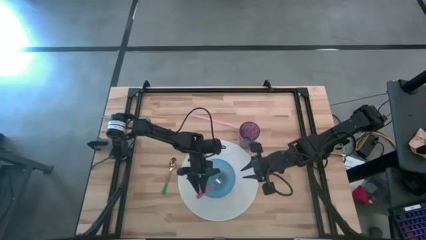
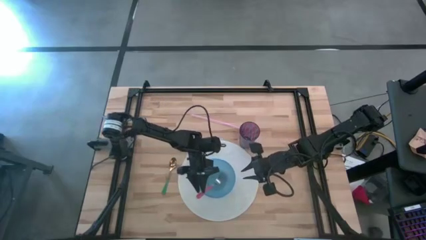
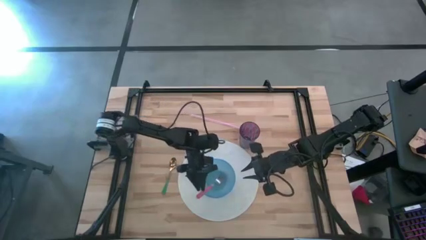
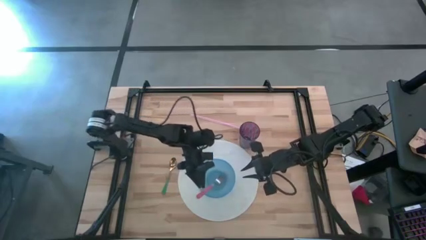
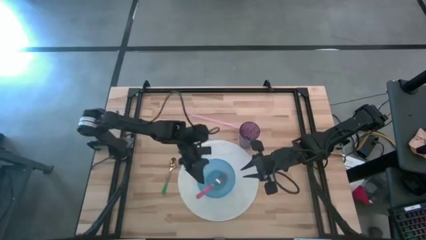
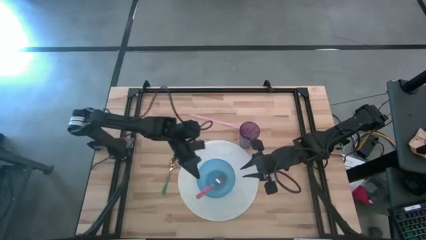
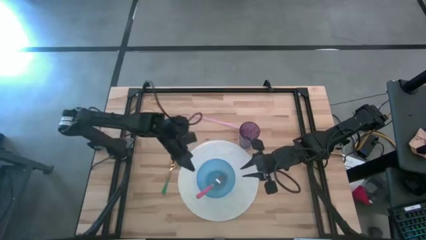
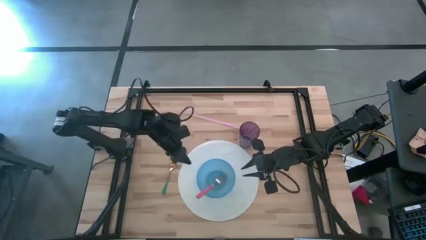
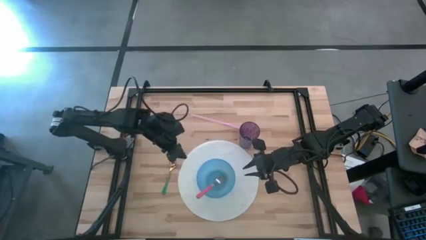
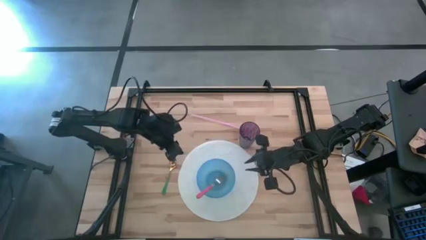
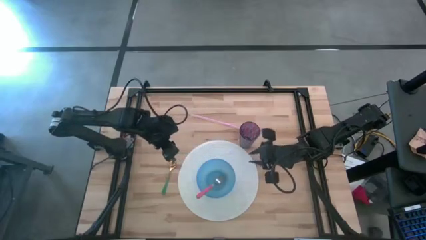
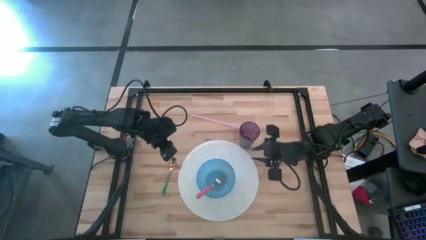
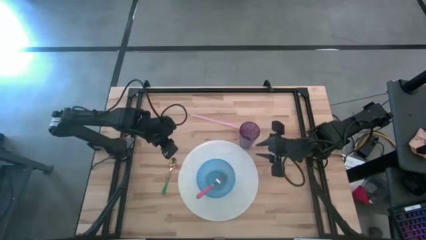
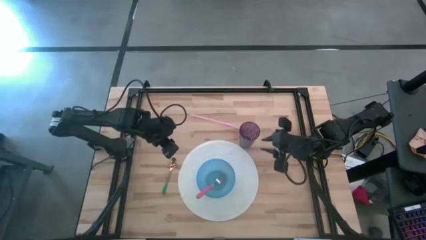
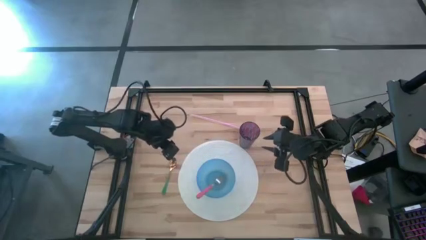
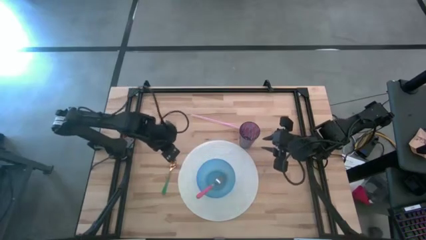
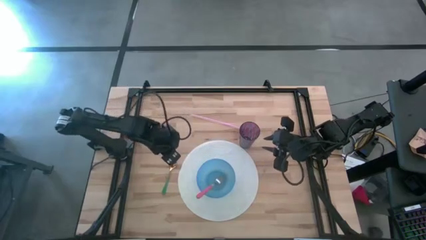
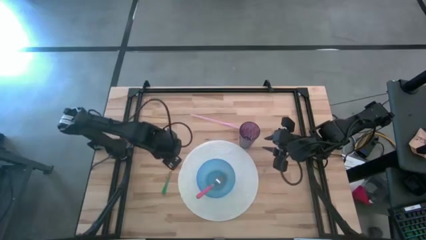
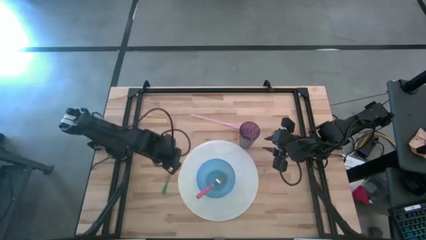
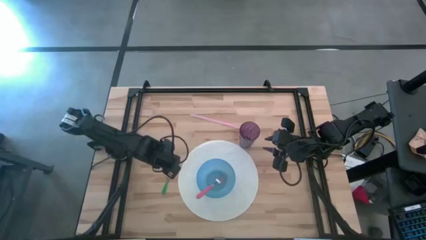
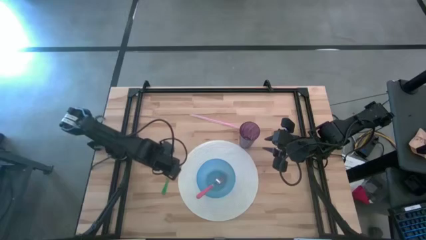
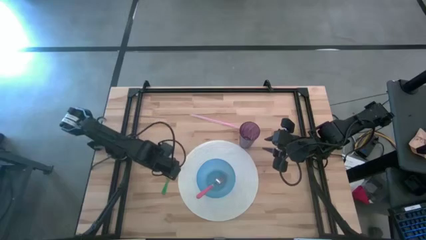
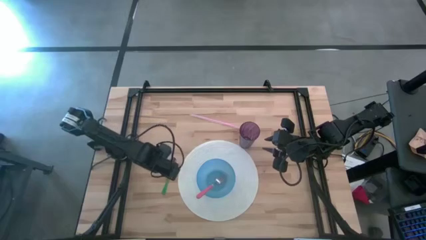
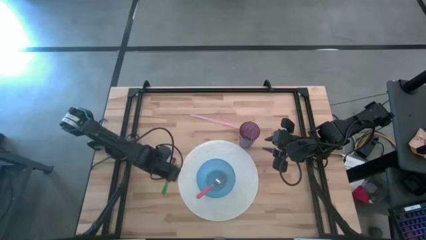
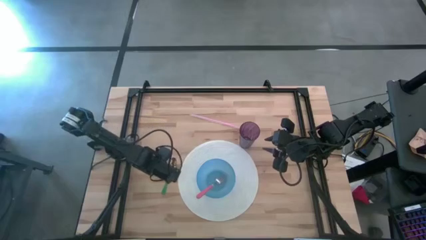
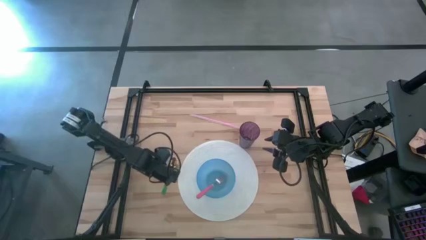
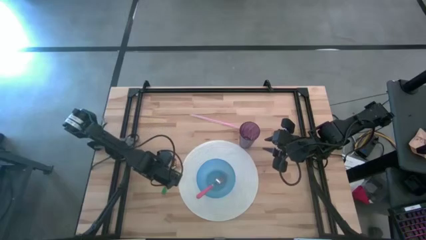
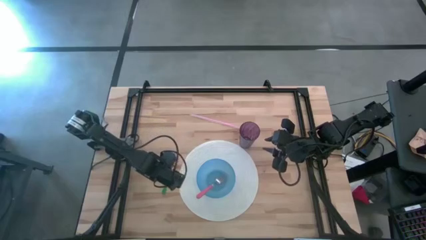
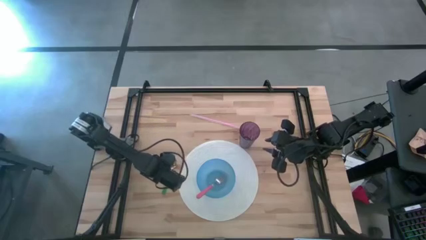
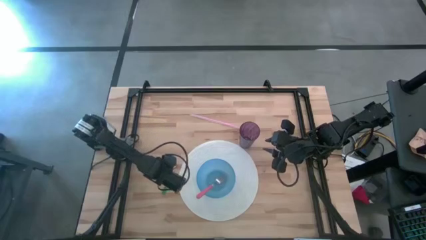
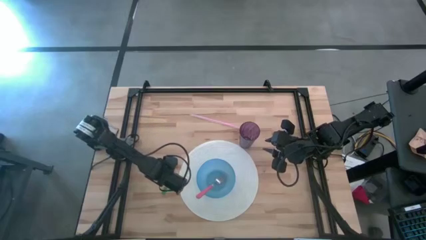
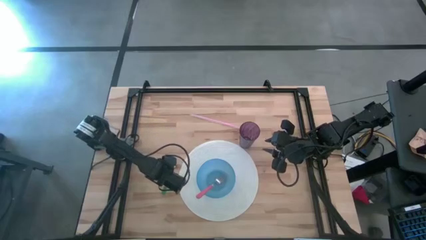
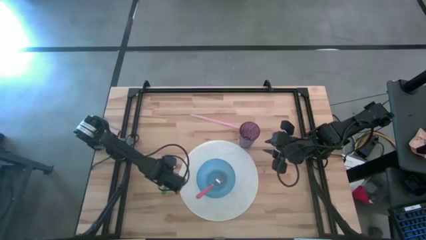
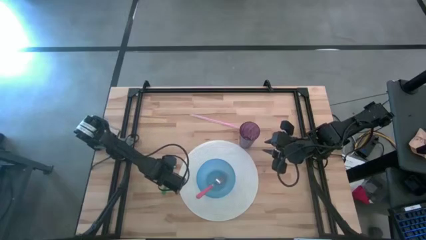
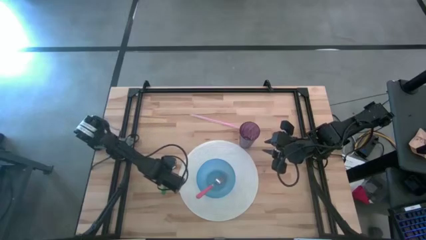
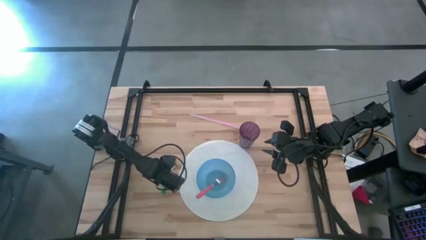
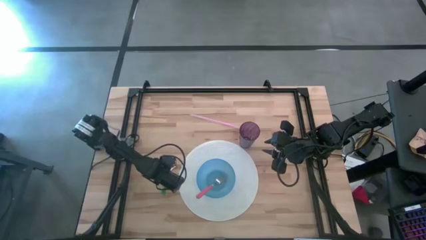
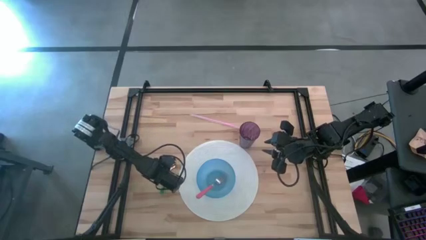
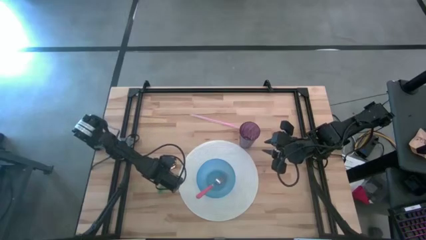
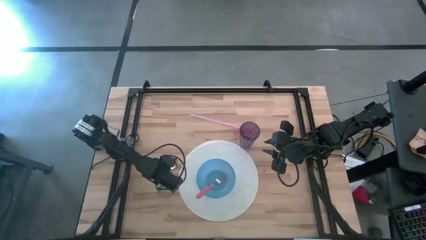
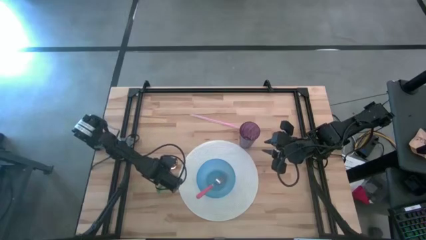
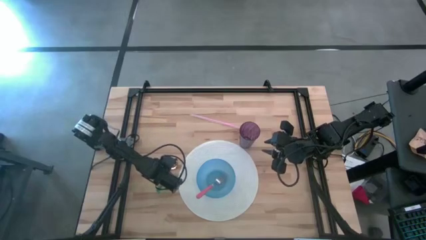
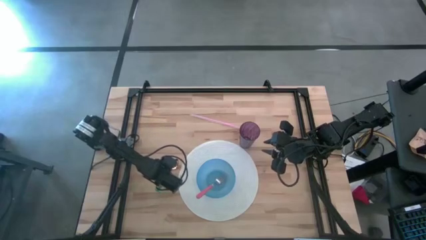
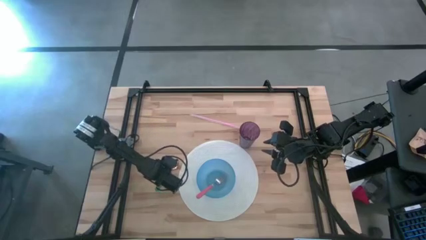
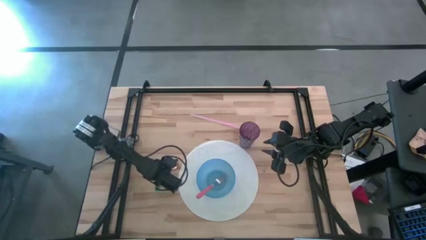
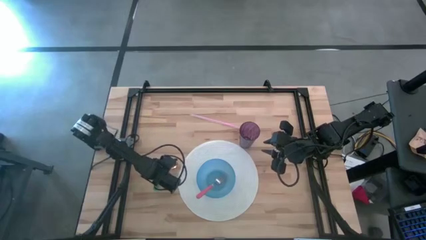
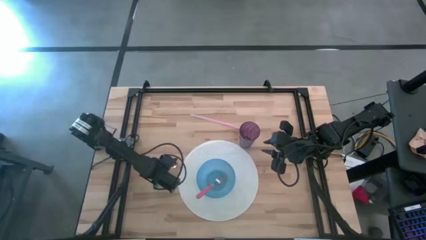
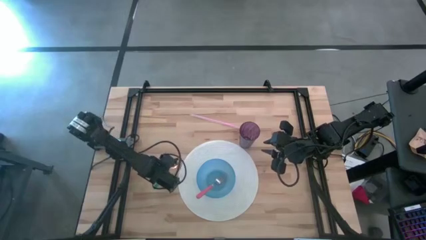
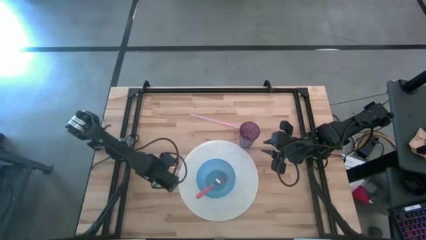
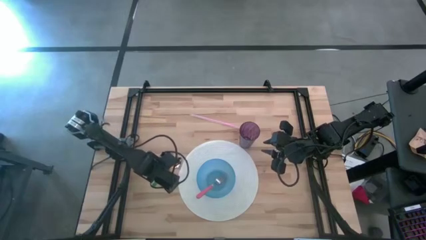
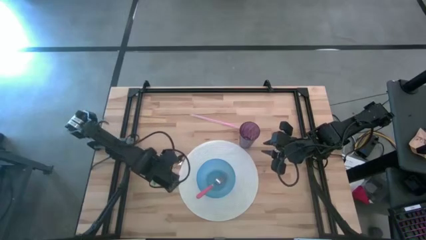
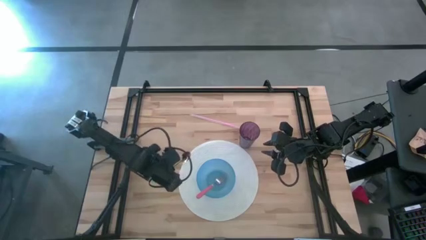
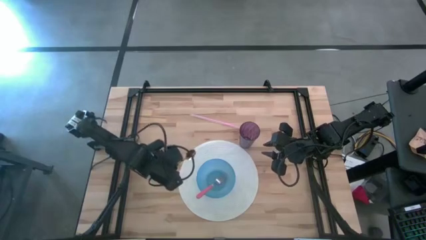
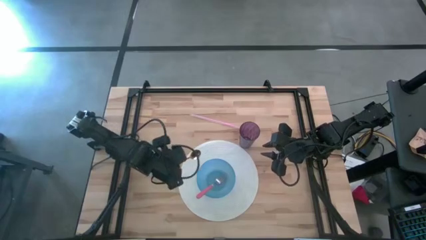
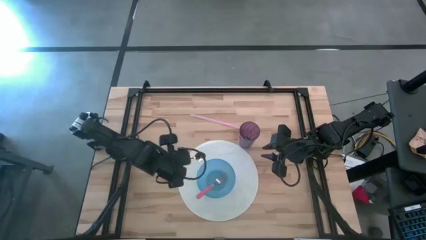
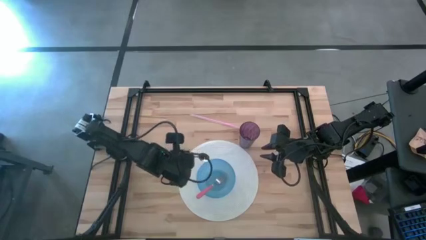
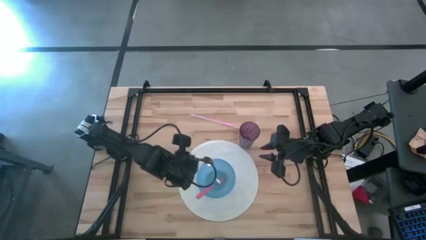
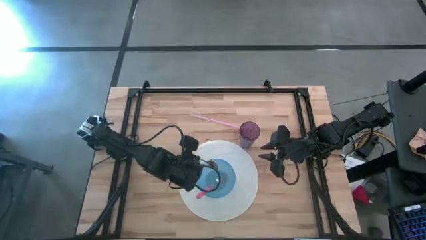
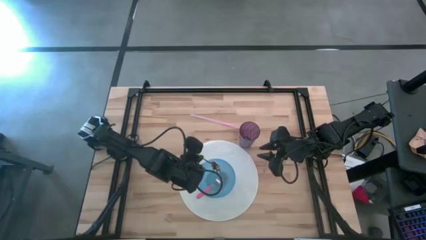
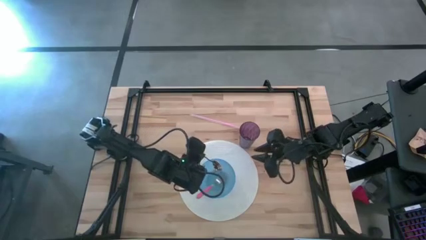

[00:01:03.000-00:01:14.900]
Task: Pick & Place Utensil
Put the green spoon in the blue bowl

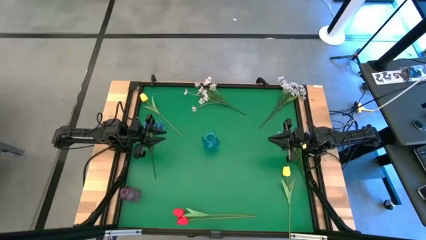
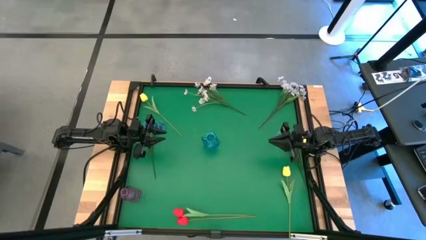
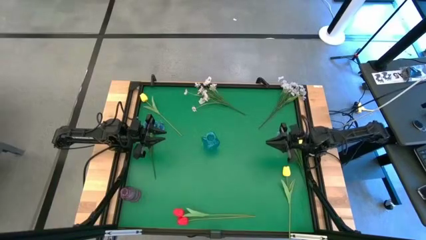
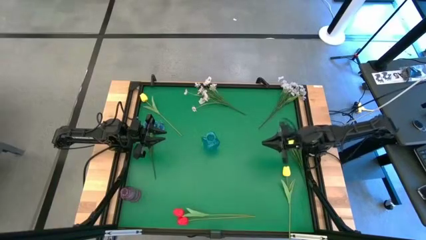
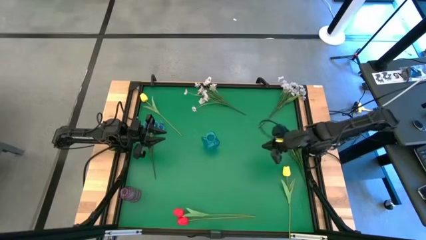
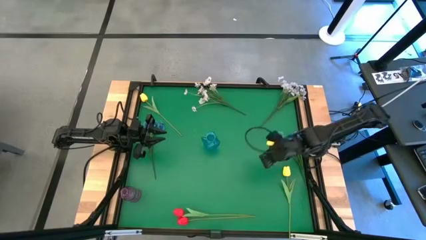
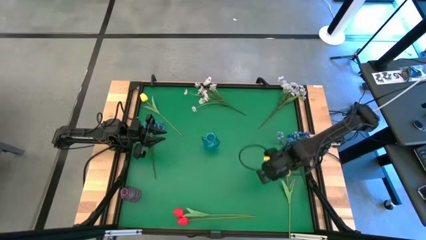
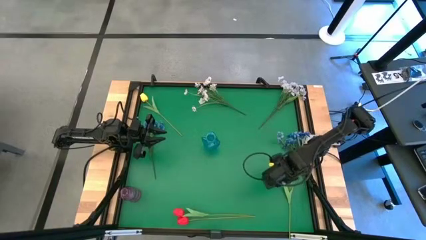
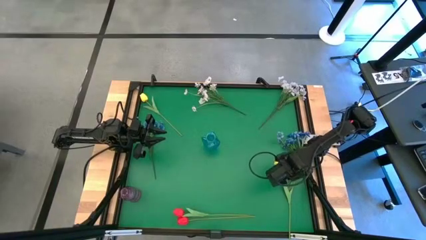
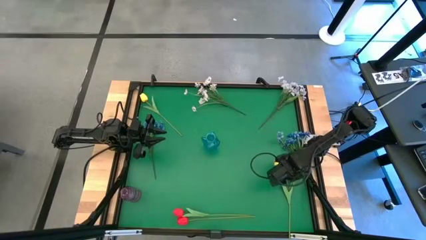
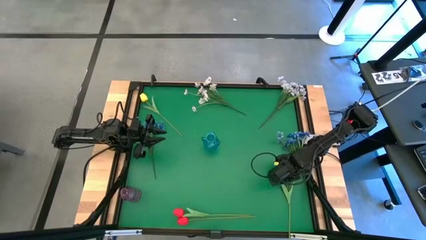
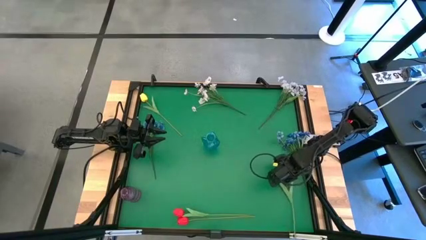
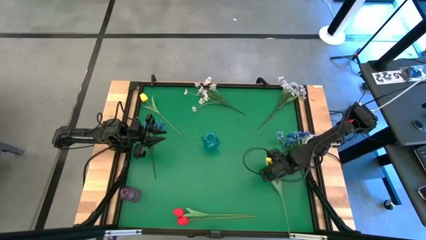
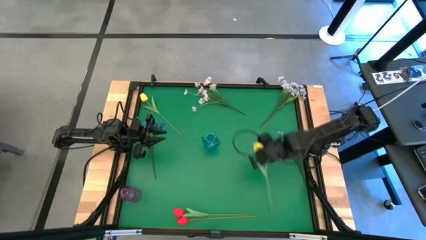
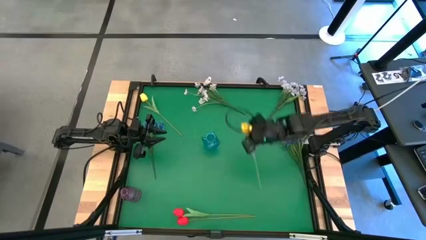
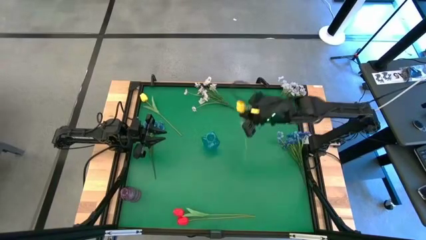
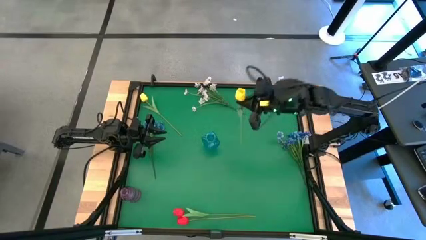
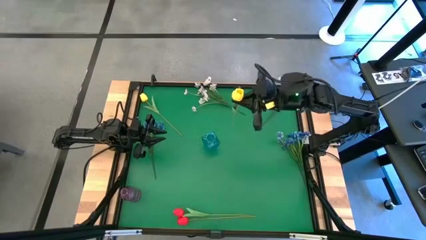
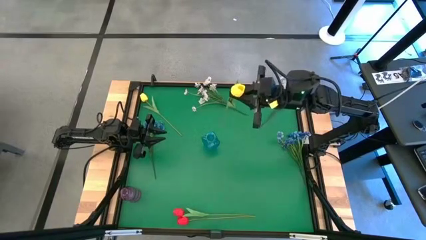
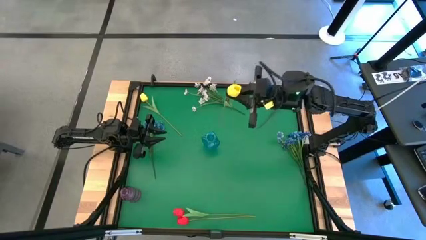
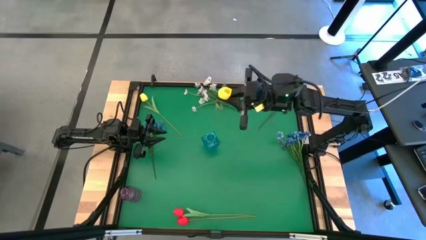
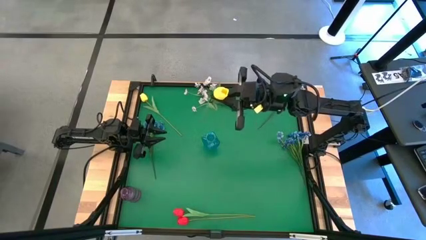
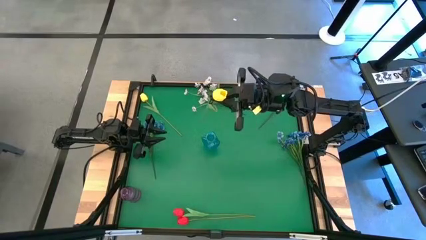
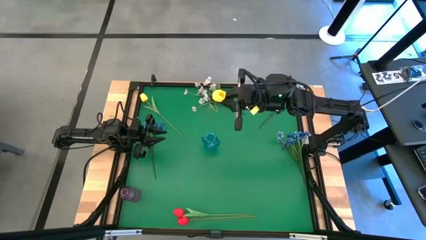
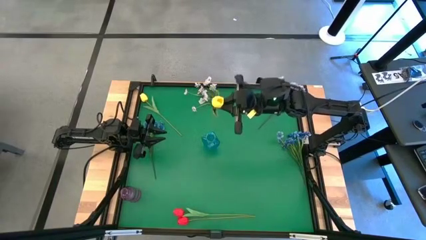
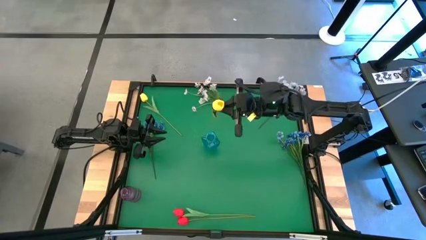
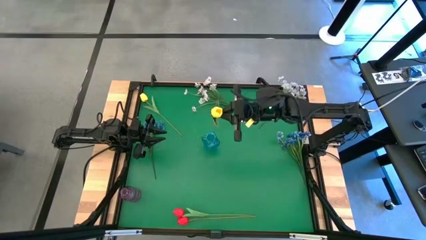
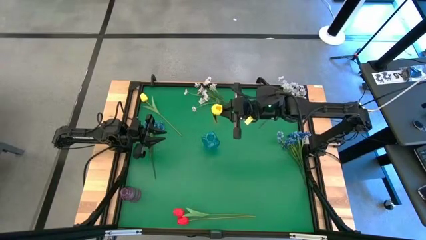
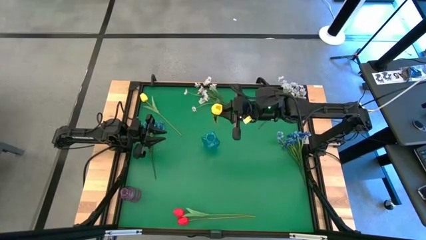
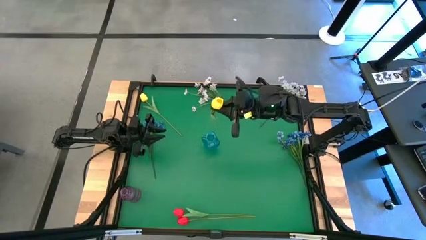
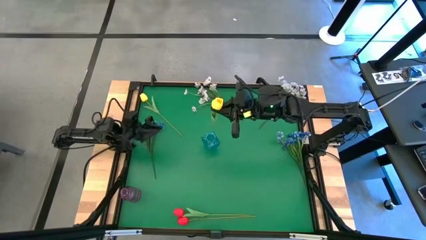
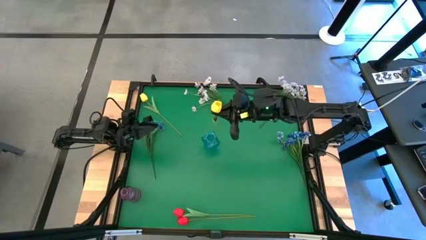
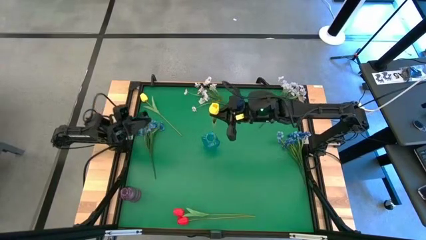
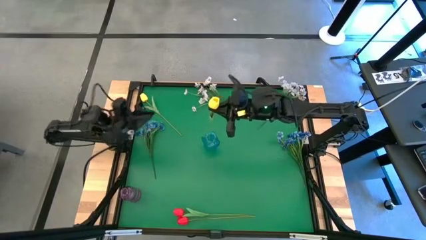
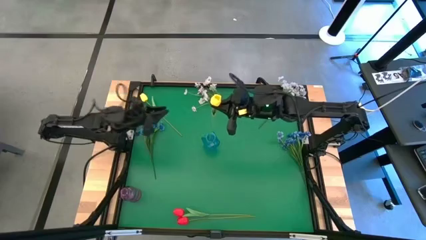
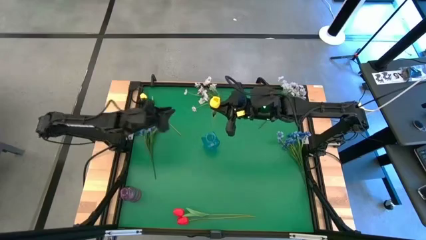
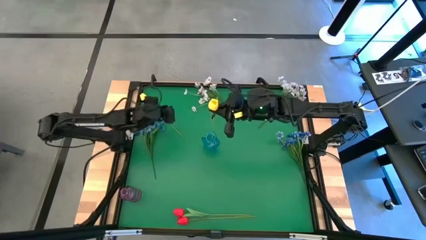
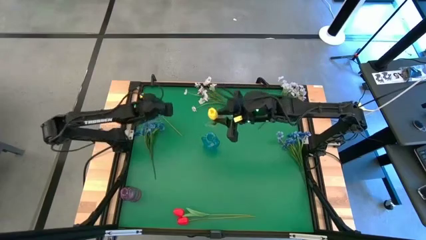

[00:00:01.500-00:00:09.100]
Task: Sort flowers into vase by color
Put the bottom yellow tulip into the blue vase
